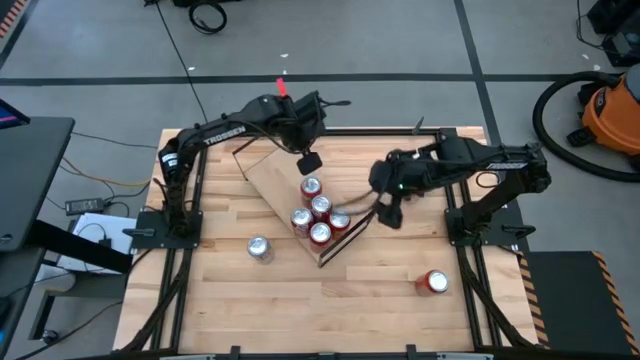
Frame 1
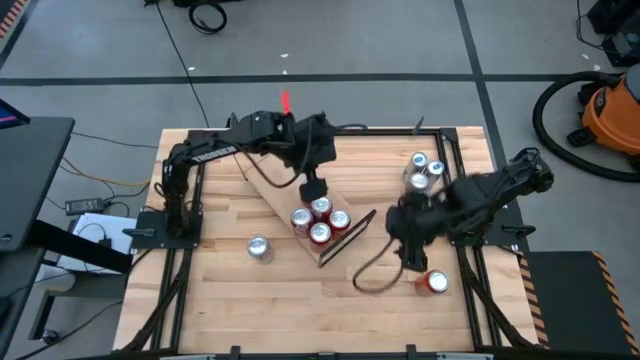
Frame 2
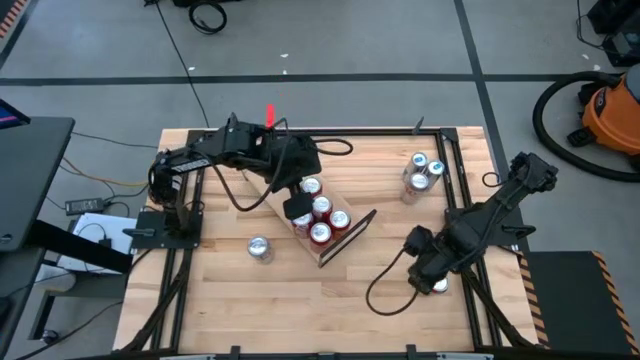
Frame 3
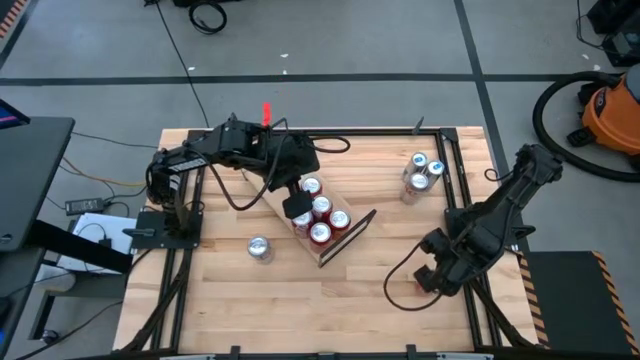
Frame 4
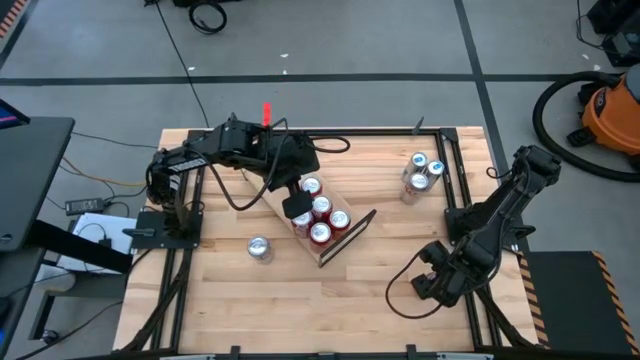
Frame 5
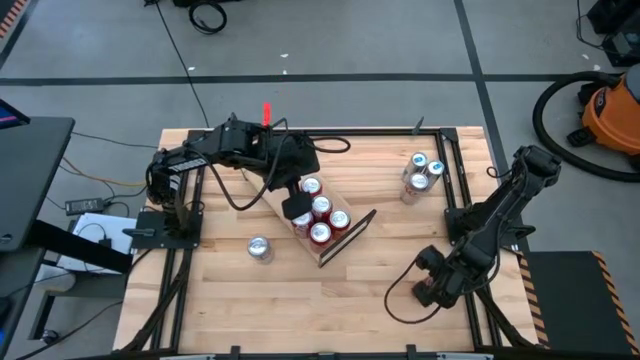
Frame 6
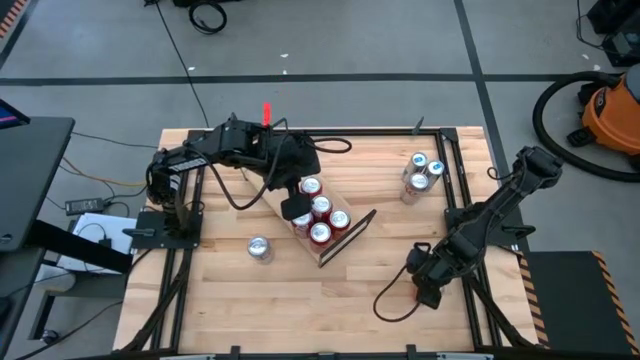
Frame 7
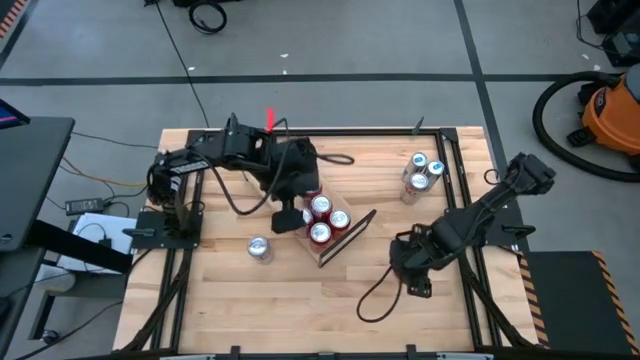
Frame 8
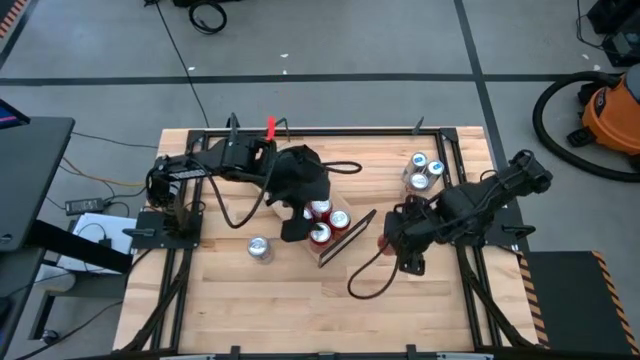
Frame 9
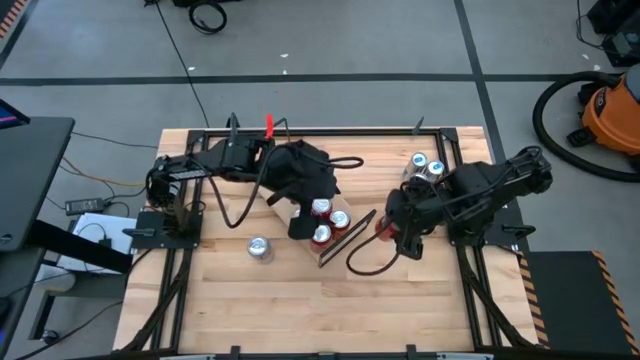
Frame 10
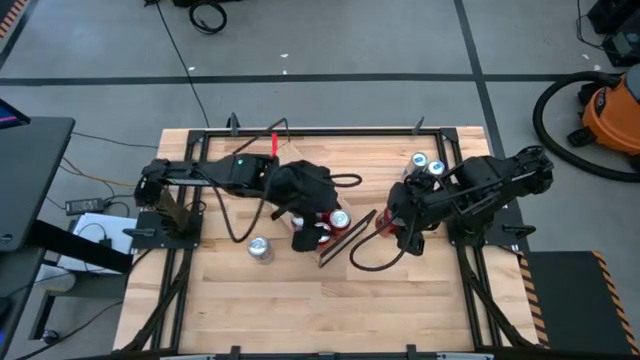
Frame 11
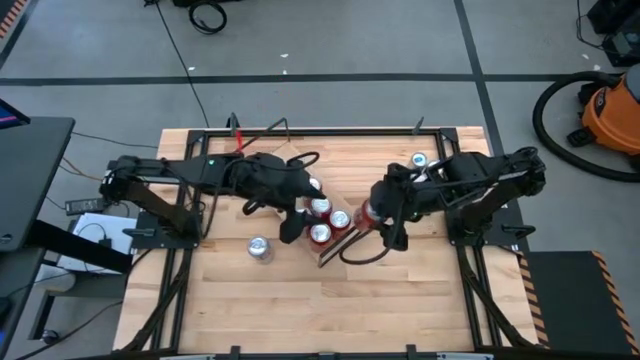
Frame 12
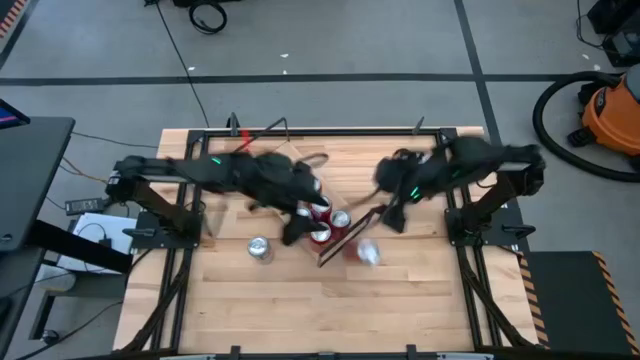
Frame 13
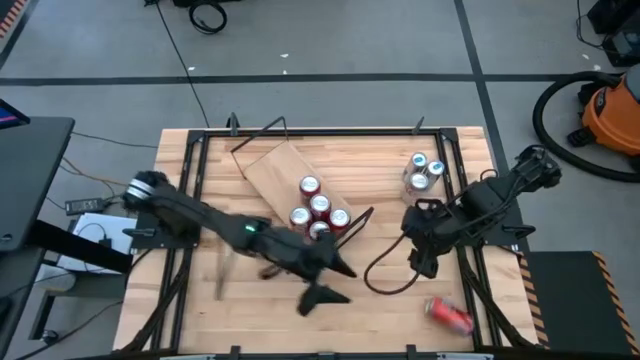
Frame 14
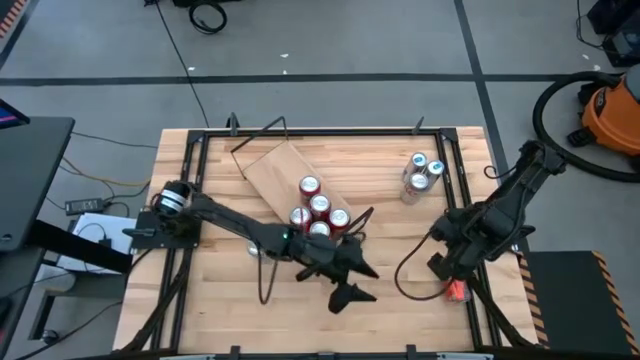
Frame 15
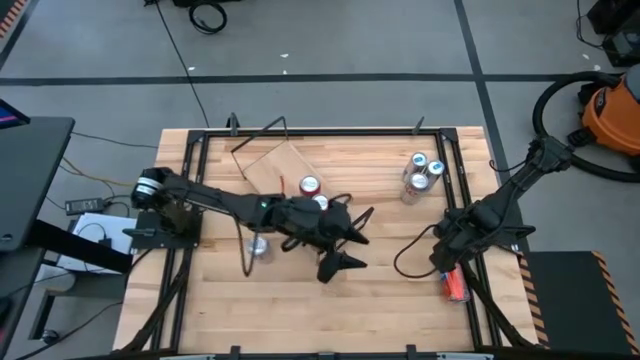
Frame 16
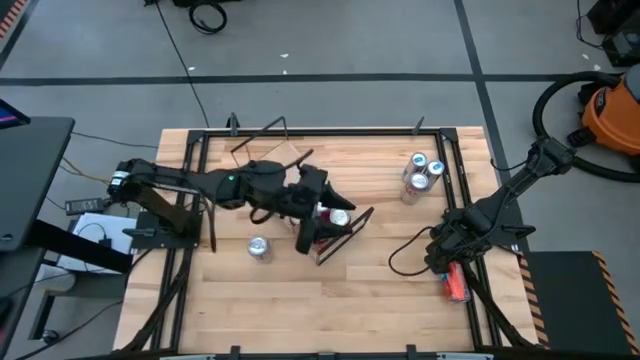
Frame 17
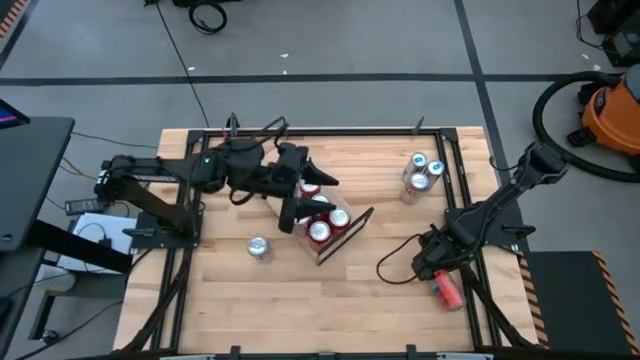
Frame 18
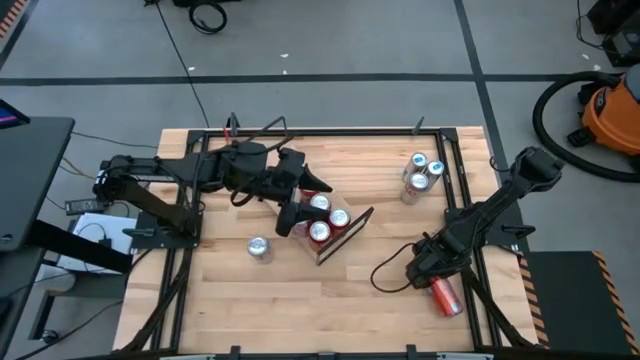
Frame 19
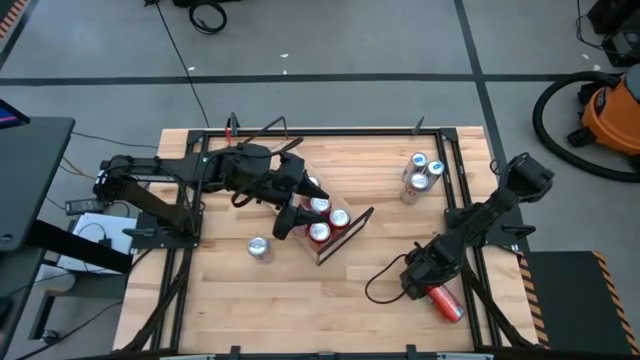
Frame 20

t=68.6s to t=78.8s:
Task: Place canned beverage on shelf
Put the orange soda can on the shelf aligned with the other orange soda can

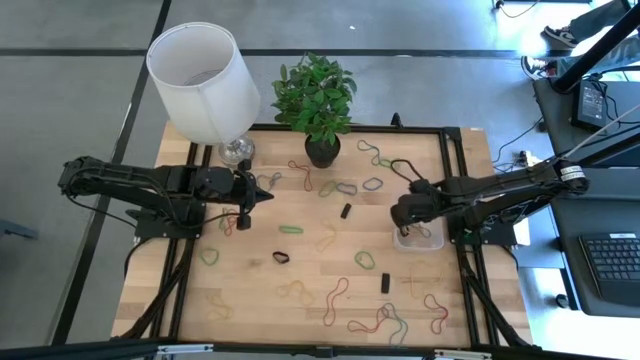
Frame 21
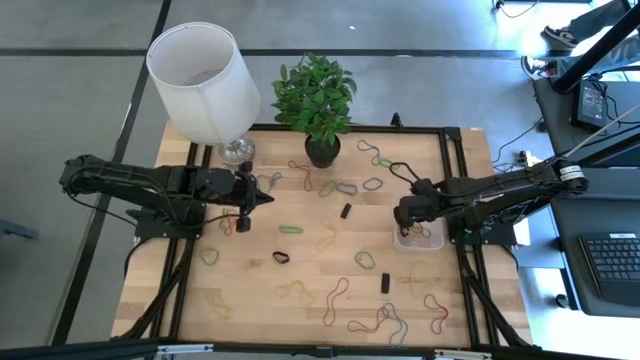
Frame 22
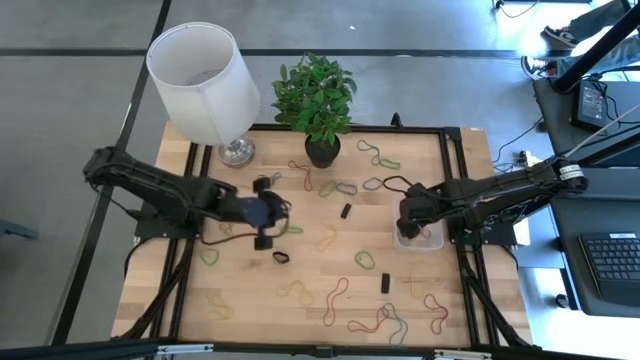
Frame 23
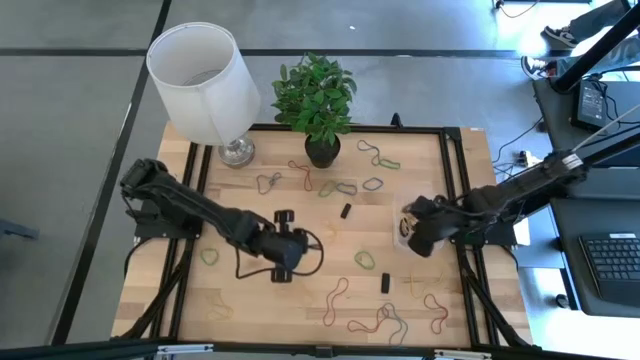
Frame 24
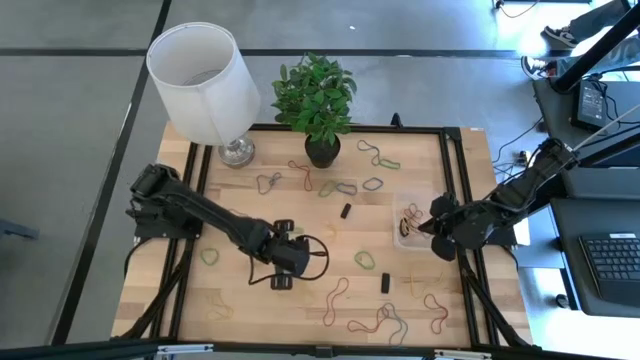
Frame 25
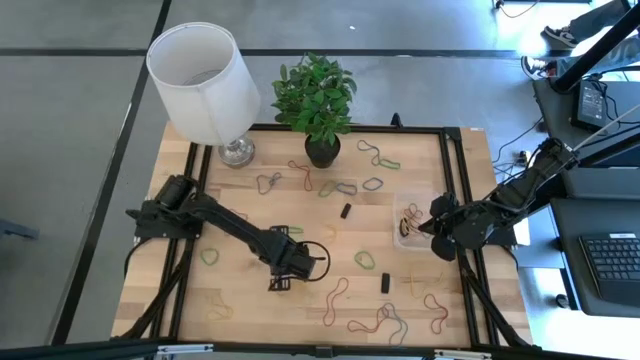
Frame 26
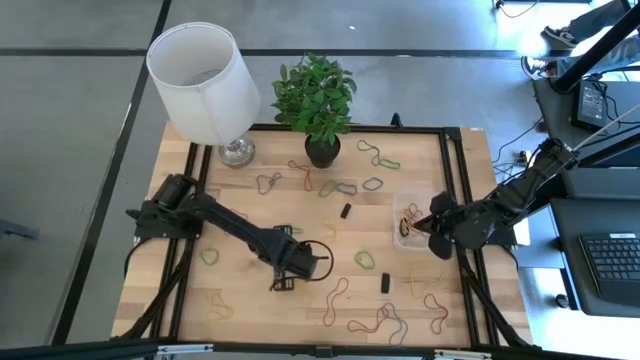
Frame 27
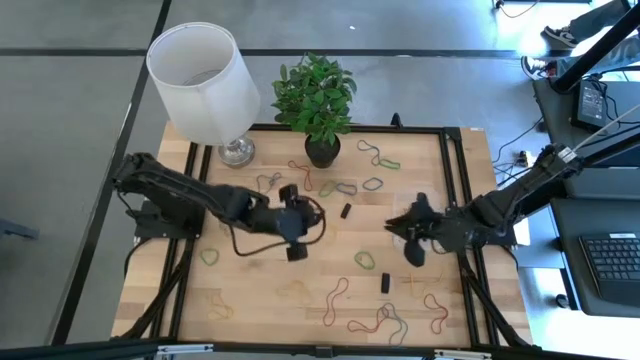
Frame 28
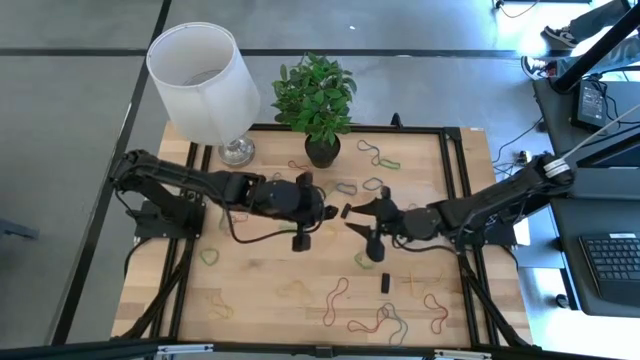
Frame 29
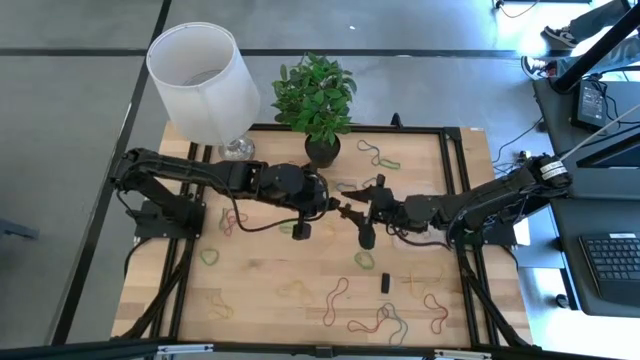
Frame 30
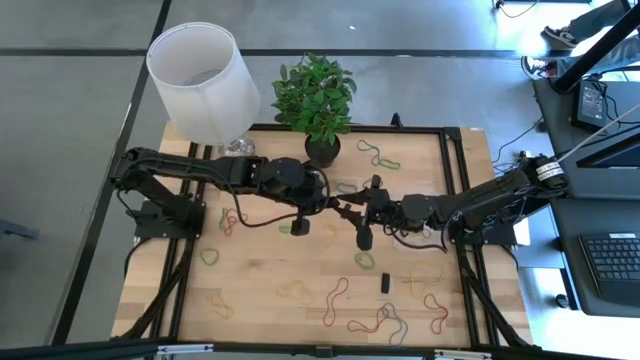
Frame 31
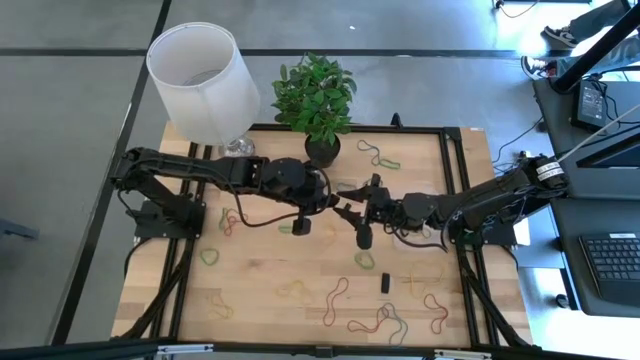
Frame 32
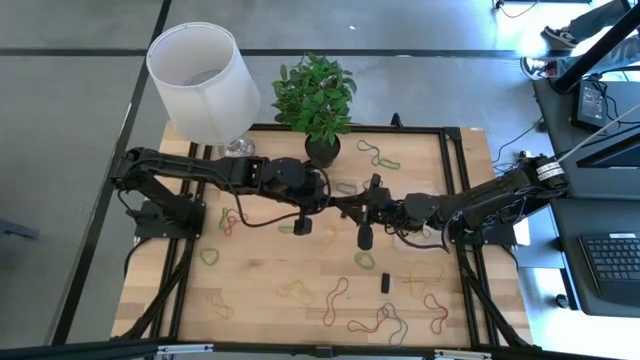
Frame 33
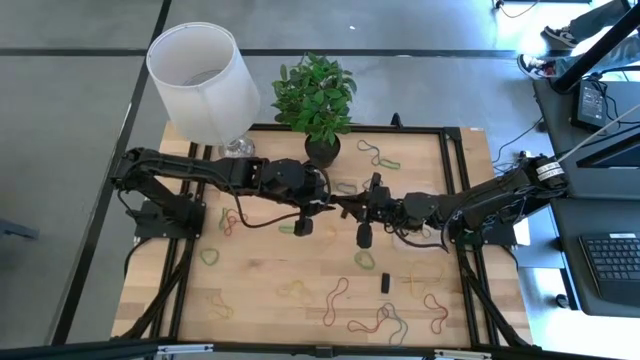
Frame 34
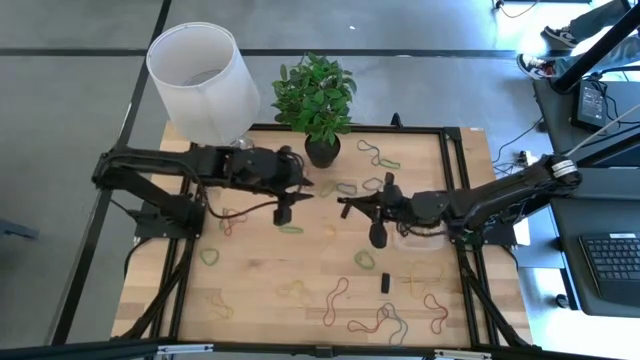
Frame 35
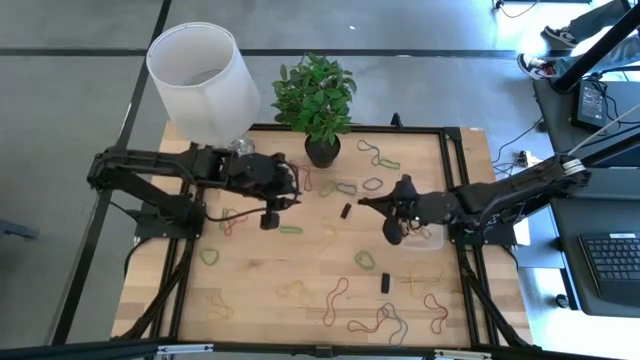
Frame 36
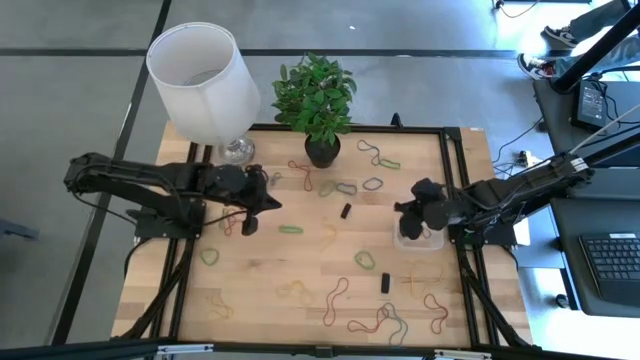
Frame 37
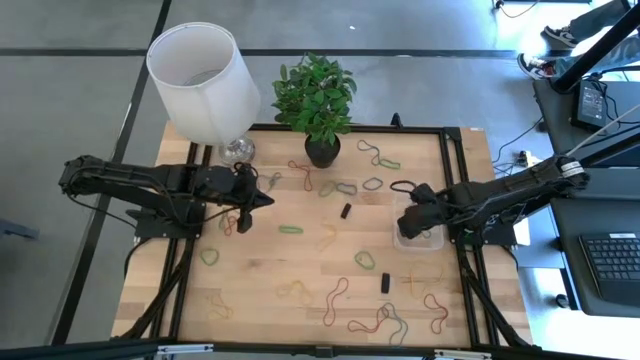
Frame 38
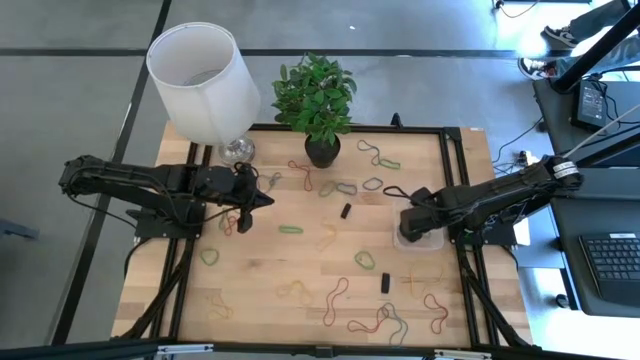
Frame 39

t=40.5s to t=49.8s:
Task: Pick and place rubber bands into bin
Put the black rubber band into the transparent bin

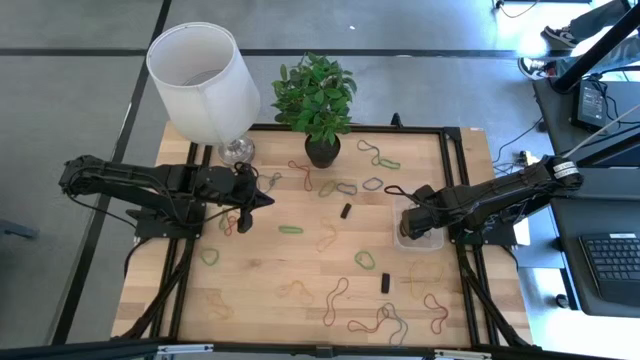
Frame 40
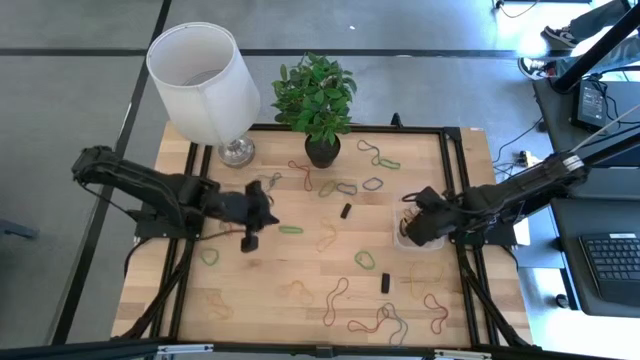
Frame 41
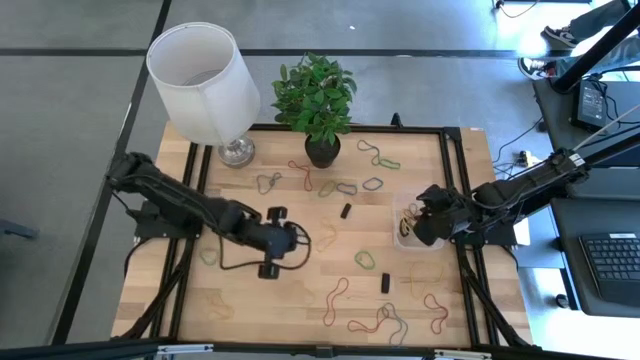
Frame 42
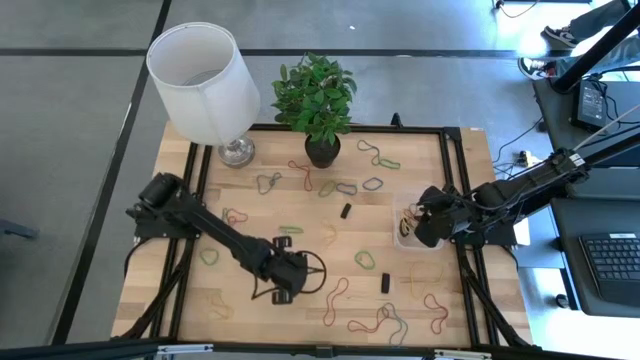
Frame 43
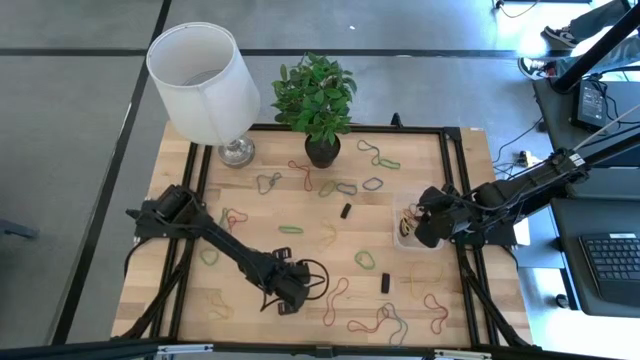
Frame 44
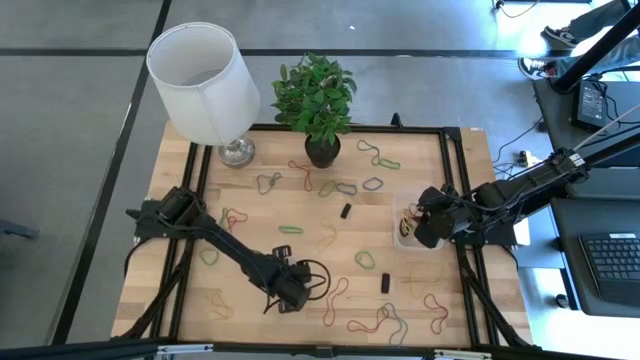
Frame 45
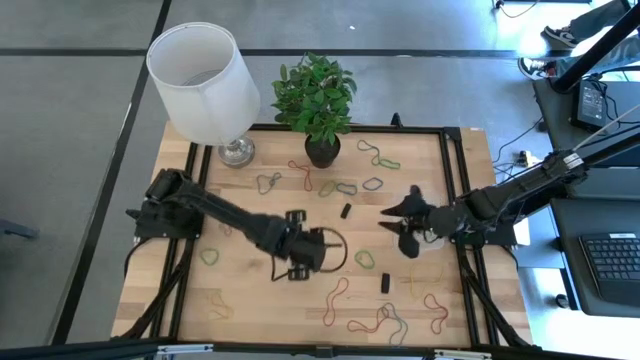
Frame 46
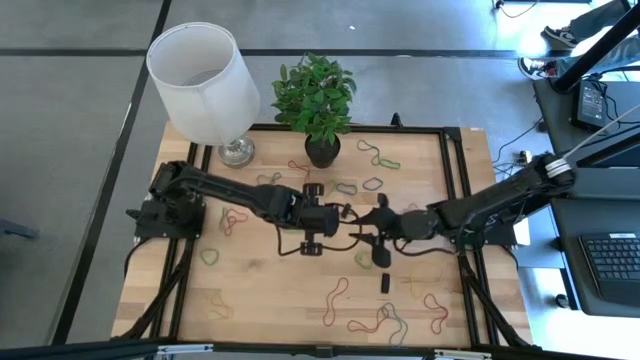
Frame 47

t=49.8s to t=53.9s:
Put the yellow rubber band into the transparent bin
